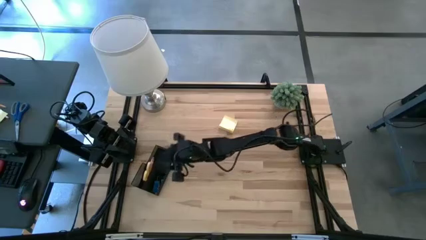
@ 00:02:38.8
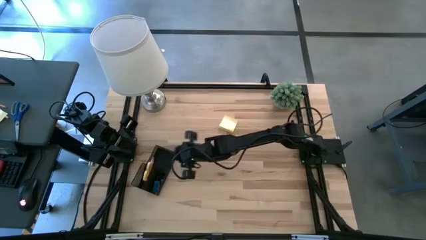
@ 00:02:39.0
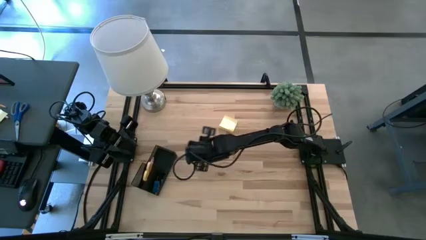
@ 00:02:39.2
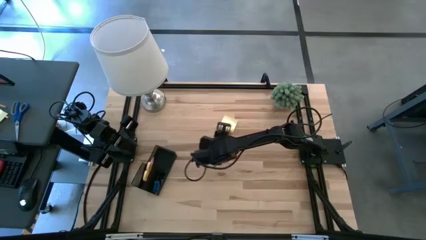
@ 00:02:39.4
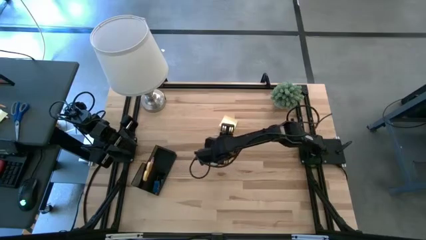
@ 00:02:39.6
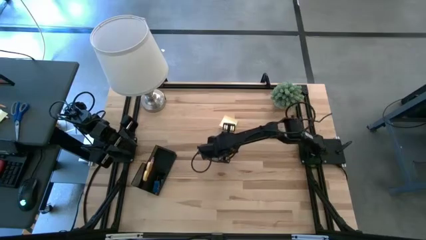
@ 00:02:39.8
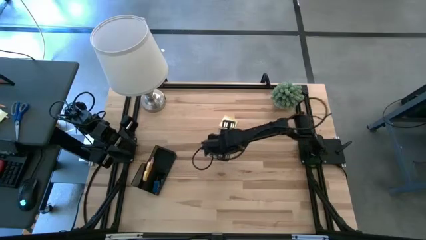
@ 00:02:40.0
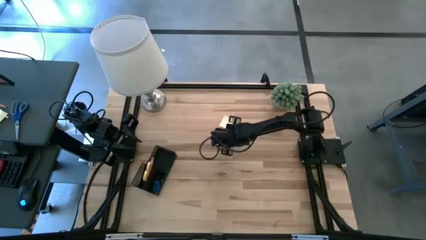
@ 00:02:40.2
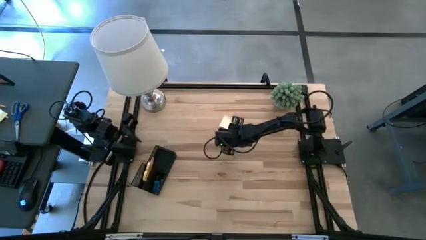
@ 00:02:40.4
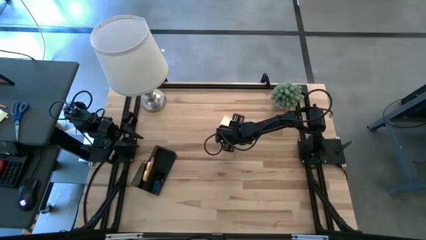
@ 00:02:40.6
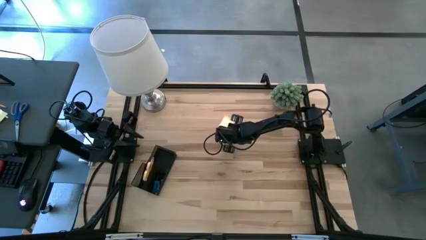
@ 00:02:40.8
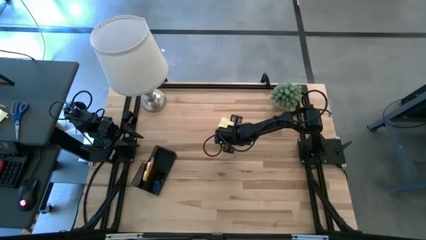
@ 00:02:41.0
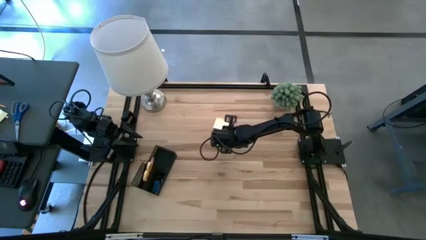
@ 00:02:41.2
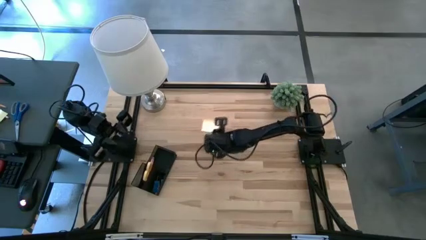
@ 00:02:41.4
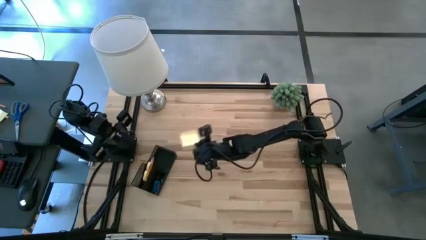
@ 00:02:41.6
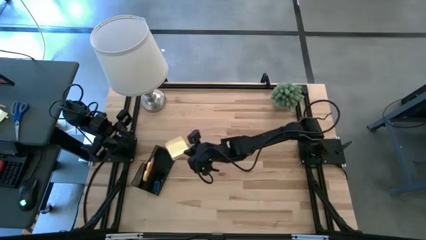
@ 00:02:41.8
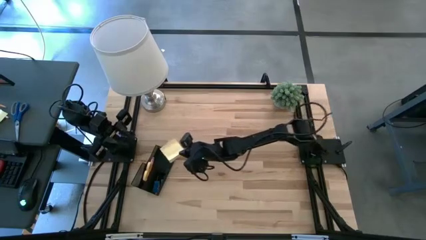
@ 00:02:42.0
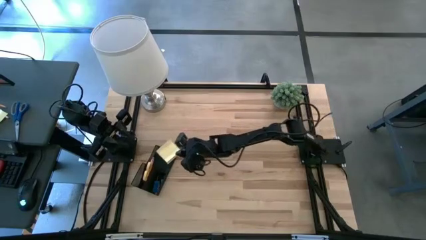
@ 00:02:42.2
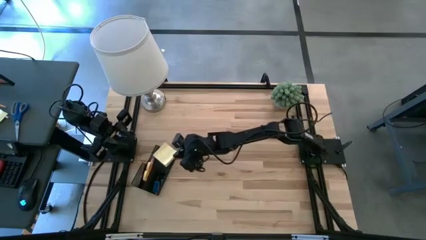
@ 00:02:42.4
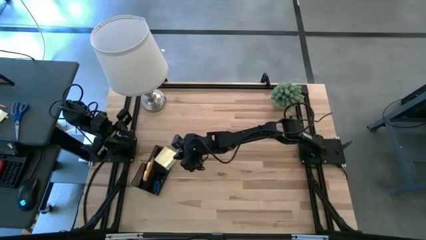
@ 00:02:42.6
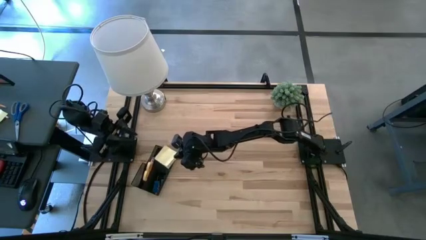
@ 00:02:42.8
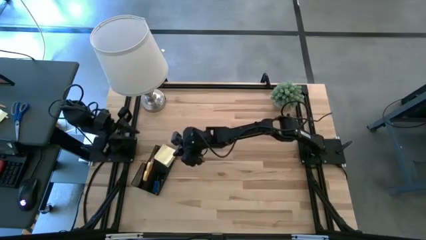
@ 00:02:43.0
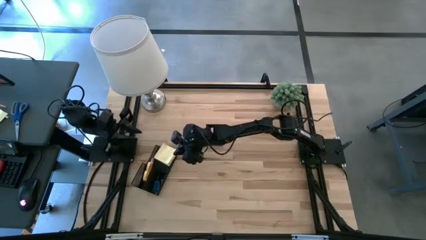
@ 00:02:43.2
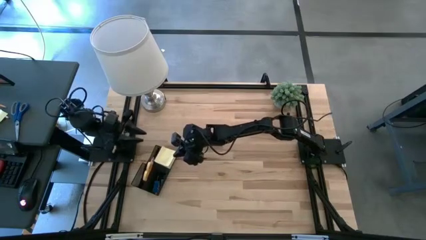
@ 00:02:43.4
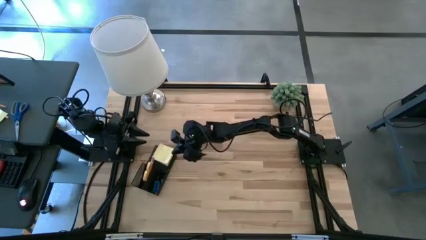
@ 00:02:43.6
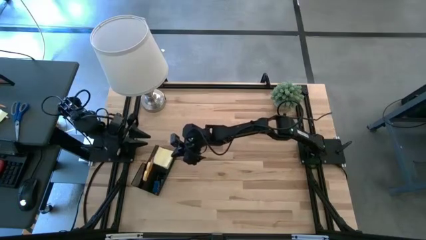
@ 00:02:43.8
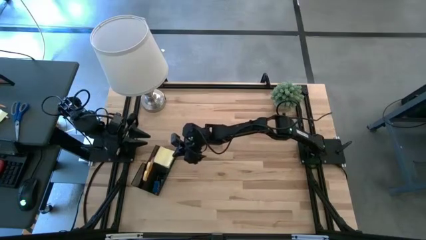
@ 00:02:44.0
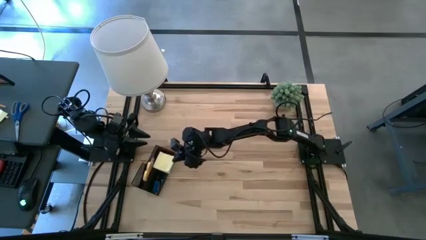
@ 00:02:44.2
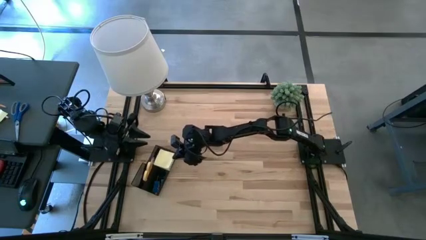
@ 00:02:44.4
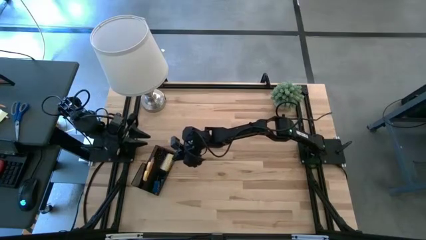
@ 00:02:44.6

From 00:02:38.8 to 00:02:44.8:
Task: Pick and place office supplies into organizer
Put the yellow sticky note into the desk organizer

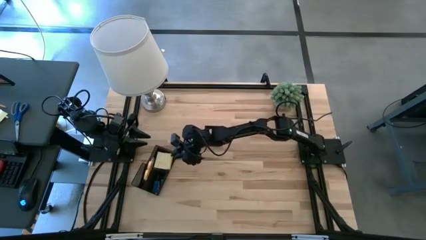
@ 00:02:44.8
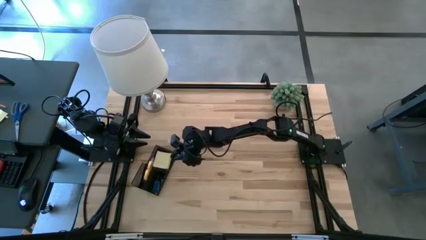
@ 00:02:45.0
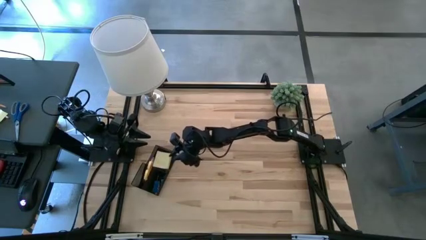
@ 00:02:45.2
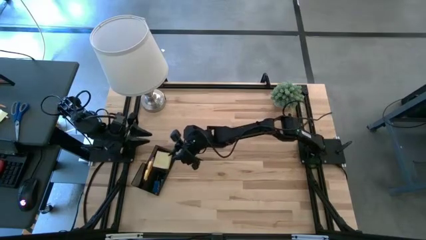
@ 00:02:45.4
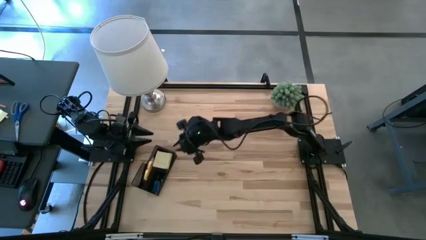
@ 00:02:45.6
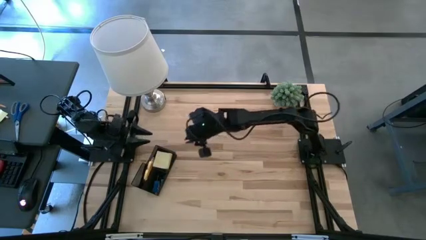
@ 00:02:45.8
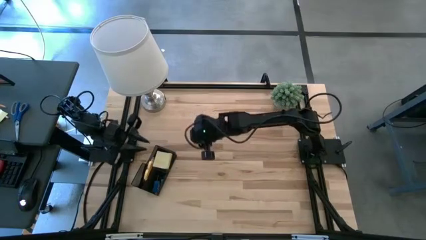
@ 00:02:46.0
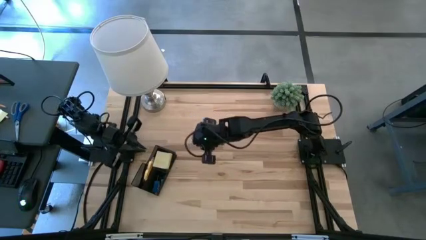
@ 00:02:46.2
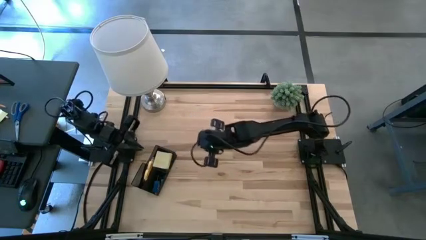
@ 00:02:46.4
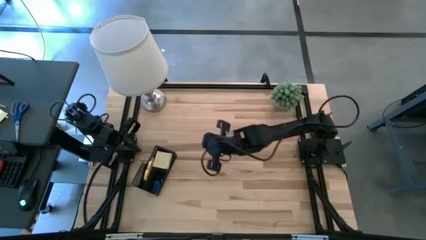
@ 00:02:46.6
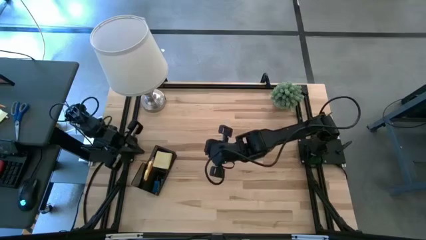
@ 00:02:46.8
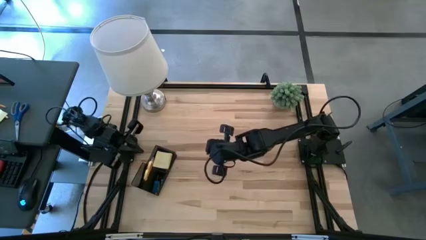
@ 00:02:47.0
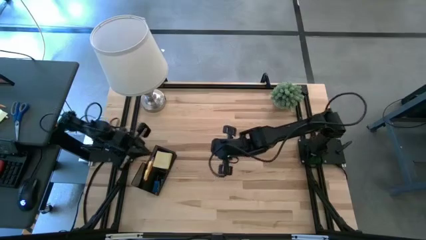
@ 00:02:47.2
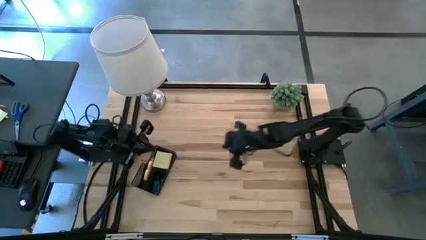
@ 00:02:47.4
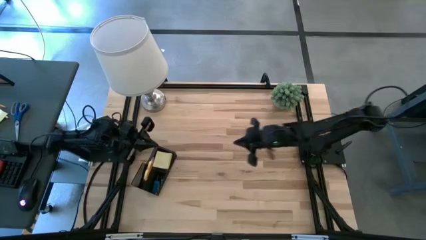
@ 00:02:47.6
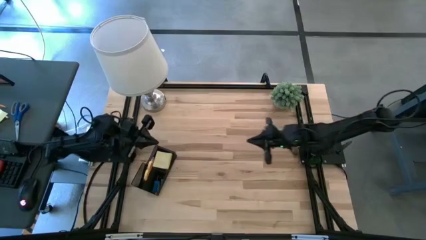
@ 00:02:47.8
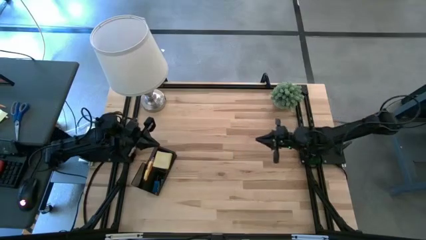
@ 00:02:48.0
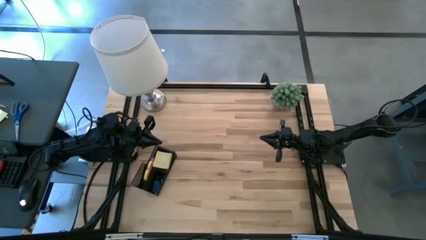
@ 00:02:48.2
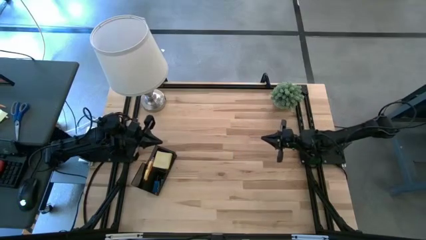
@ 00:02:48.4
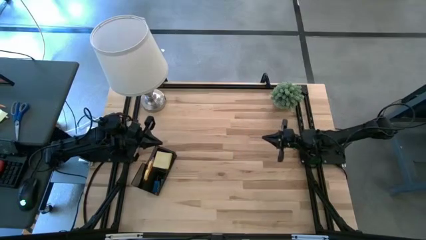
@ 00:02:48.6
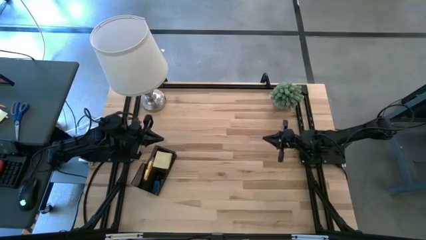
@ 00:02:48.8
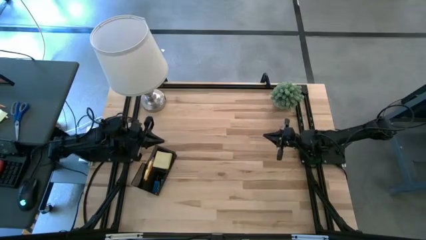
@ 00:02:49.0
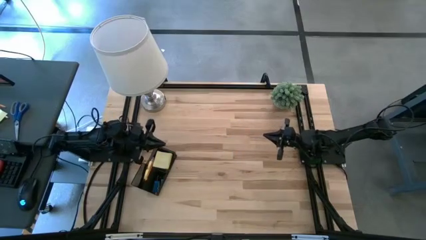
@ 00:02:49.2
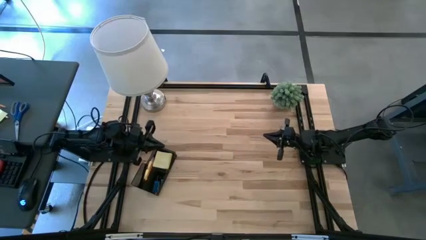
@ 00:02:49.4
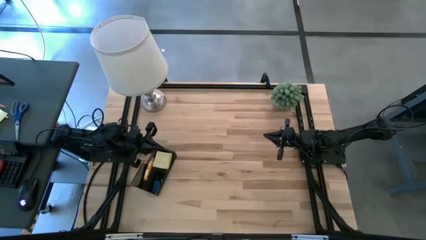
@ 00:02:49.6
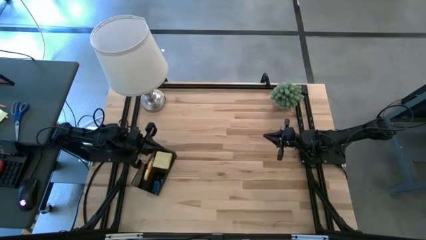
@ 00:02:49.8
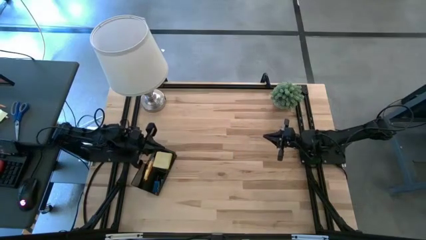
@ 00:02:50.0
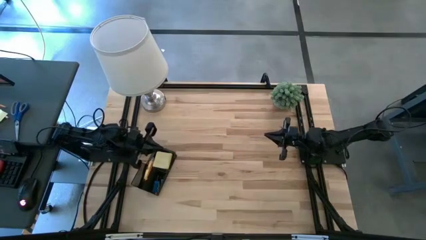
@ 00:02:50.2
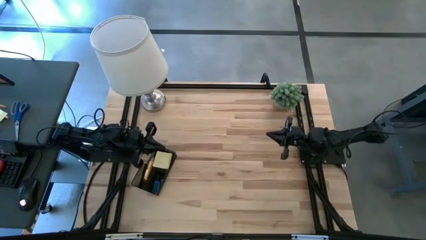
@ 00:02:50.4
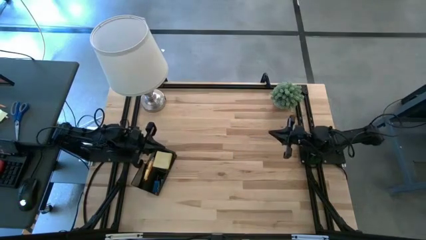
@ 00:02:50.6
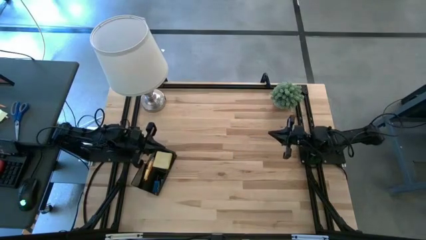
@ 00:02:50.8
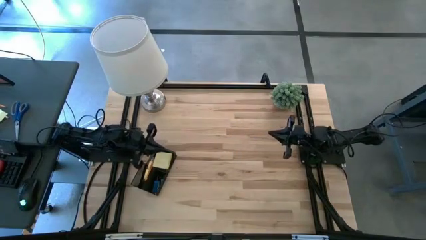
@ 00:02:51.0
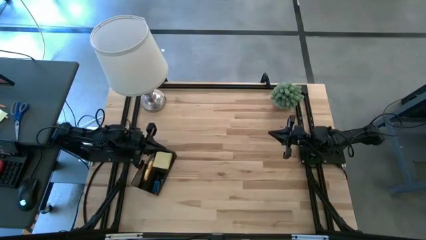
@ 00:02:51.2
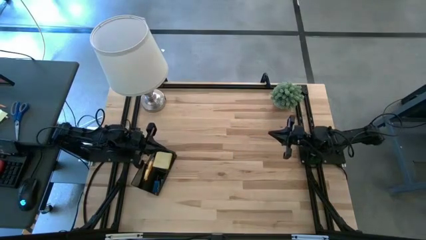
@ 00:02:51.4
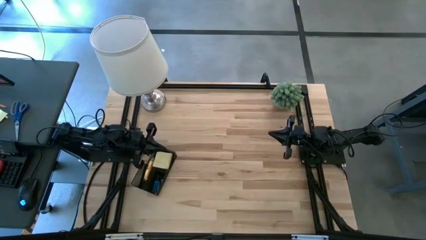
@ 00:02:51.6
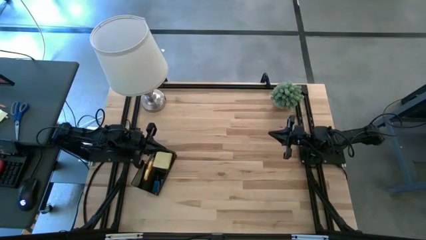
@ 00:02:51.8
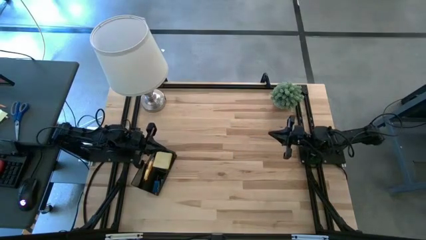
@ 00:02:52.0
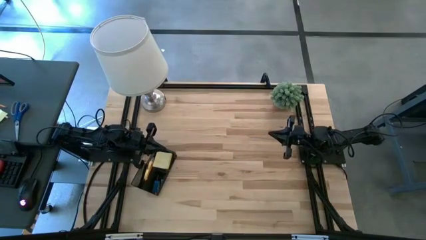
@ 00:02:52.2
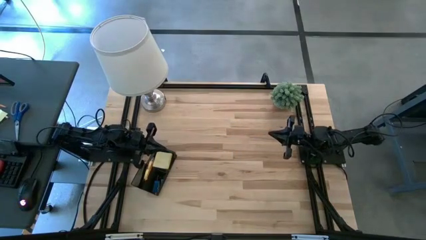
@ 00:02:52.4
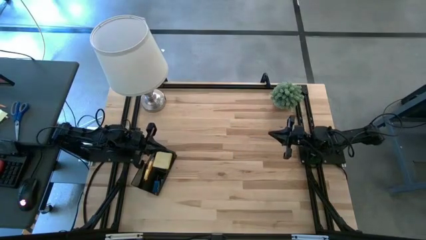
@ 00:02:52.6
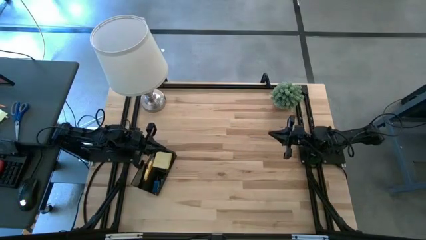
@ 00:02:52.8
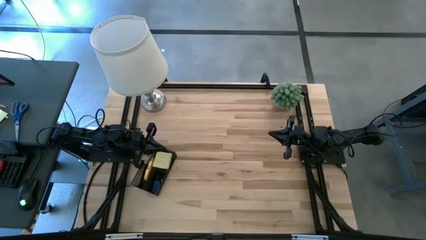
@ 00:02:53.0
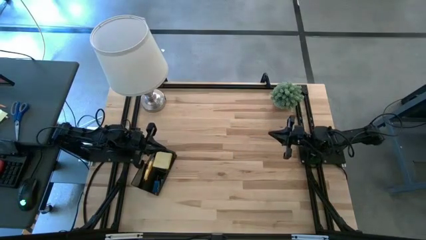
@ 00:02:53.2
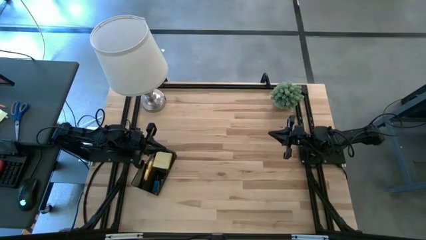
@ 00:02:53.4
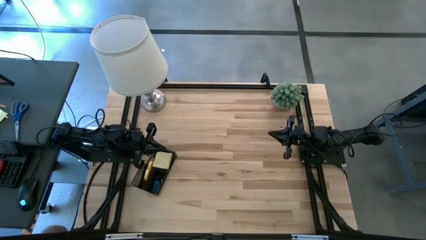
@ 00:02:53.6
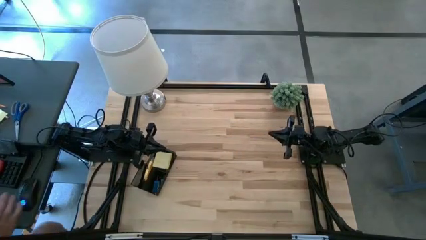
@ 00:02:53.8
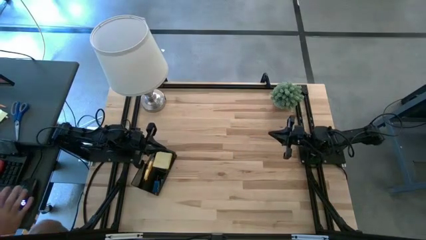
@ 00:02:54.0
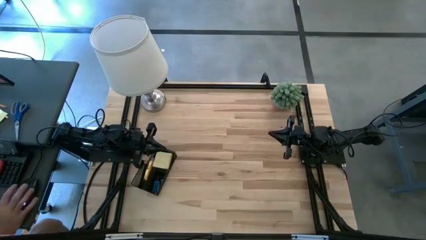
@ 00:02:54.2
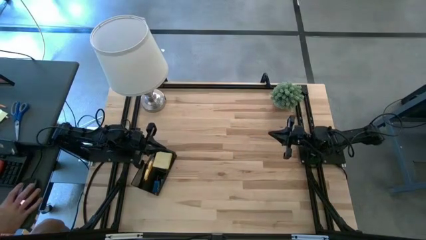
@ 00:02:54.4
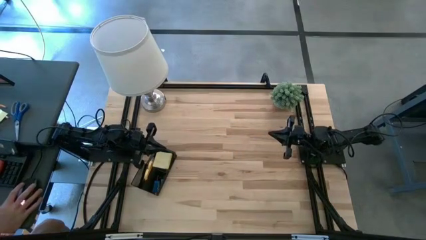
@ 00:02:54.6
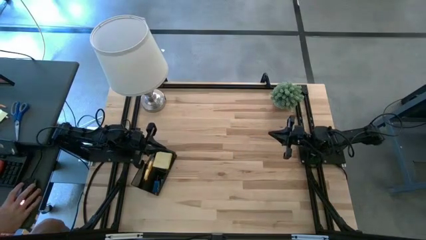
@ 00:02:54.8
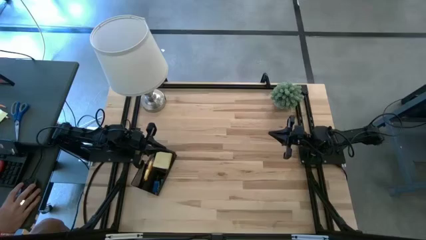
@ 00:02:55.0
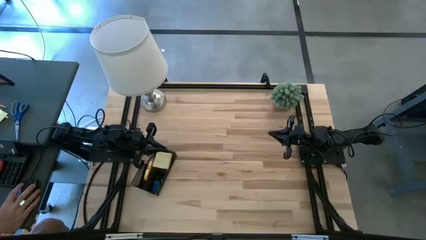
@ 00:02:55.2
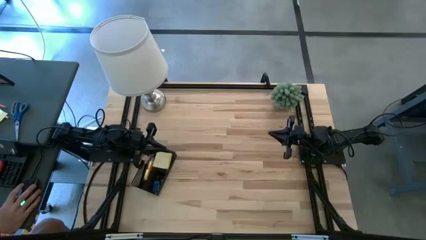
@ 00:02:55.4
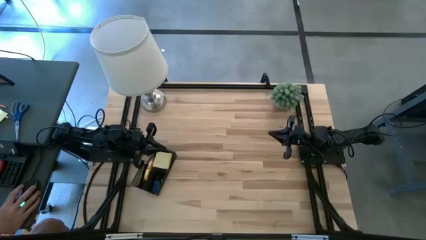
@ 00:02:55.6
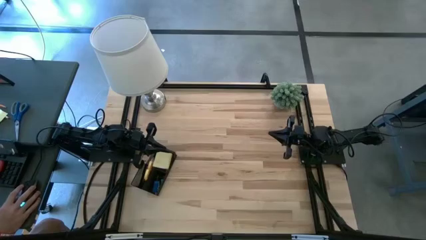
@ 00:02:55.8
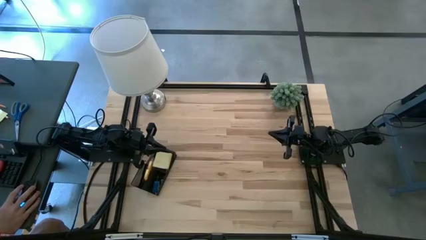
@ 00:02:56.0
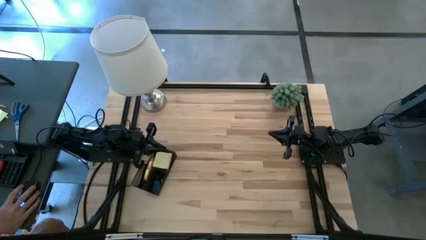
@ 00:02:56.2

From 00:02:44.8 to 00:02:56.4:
Return to Home Position
